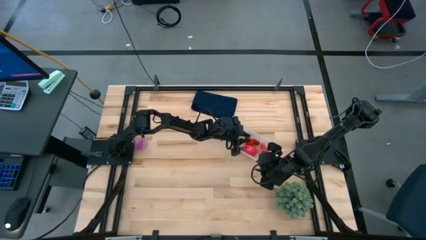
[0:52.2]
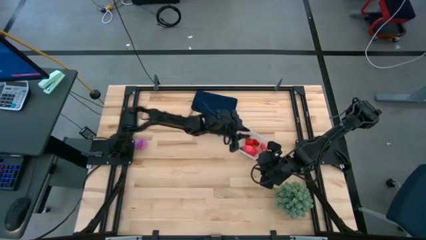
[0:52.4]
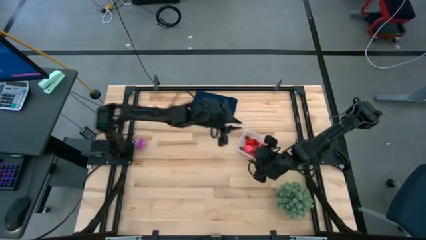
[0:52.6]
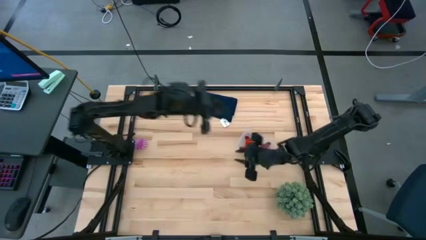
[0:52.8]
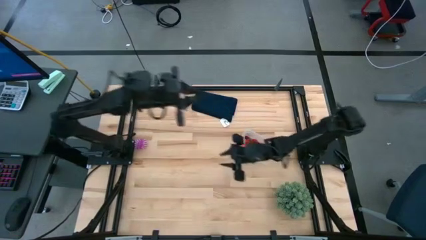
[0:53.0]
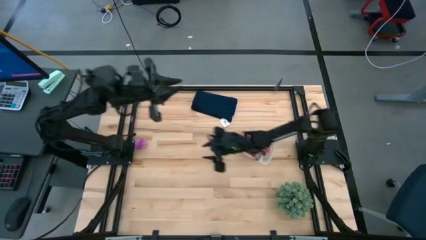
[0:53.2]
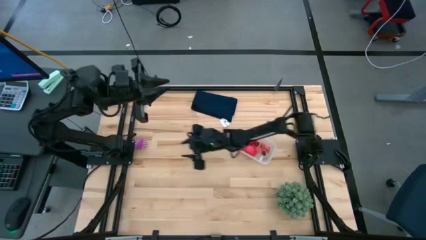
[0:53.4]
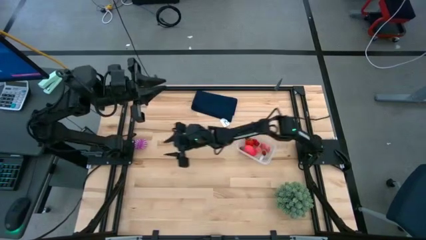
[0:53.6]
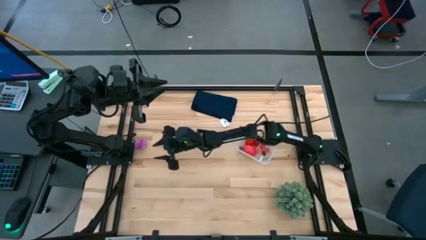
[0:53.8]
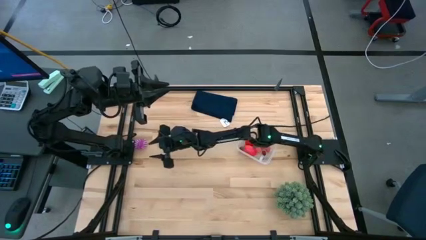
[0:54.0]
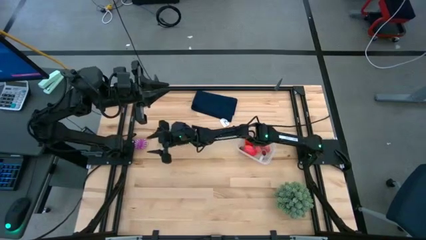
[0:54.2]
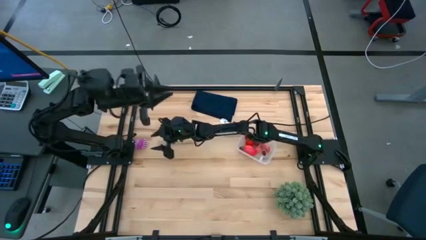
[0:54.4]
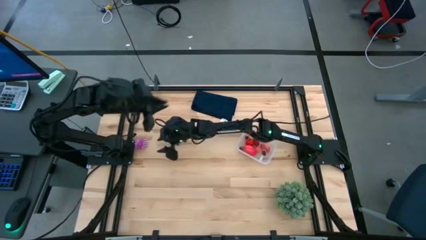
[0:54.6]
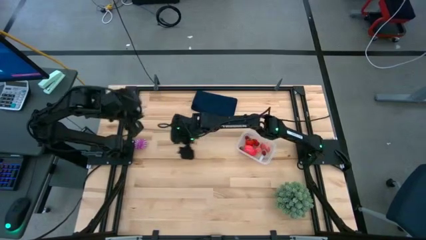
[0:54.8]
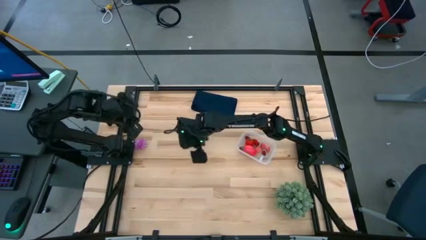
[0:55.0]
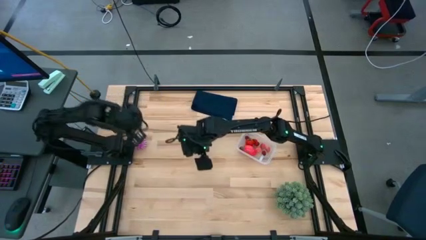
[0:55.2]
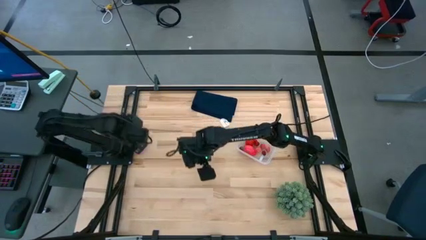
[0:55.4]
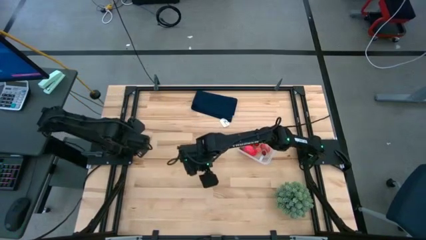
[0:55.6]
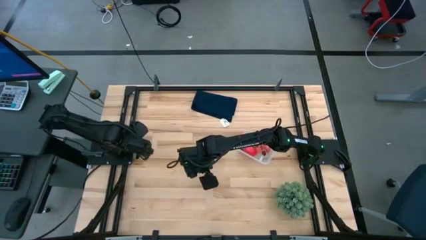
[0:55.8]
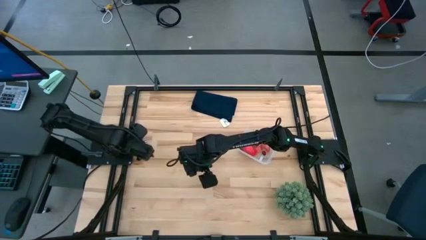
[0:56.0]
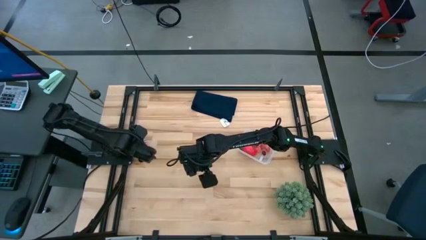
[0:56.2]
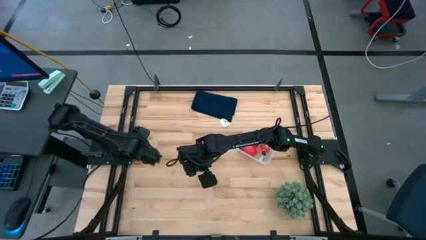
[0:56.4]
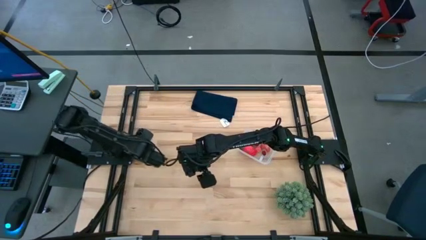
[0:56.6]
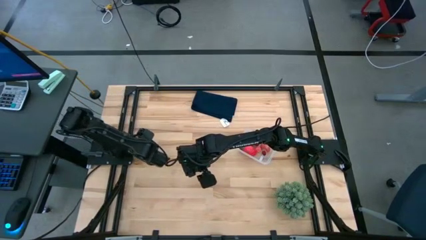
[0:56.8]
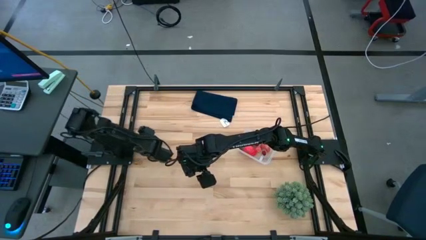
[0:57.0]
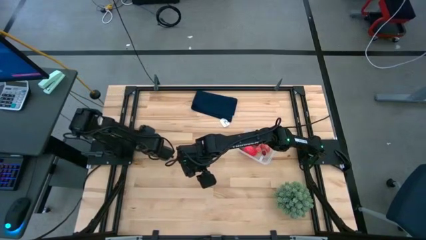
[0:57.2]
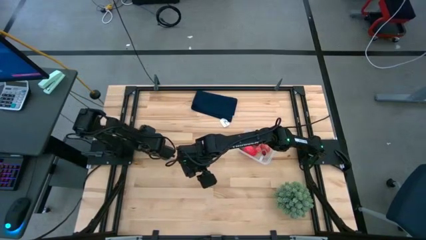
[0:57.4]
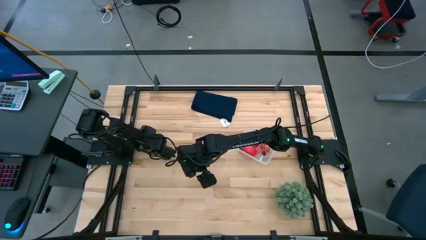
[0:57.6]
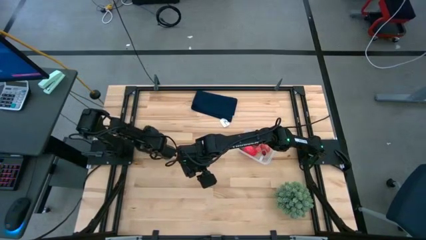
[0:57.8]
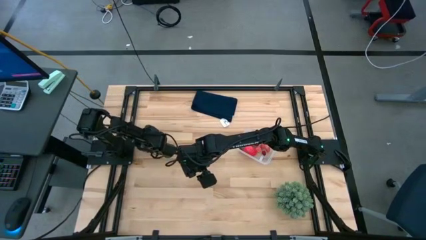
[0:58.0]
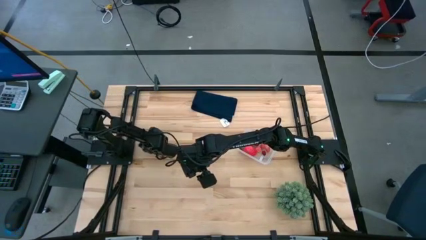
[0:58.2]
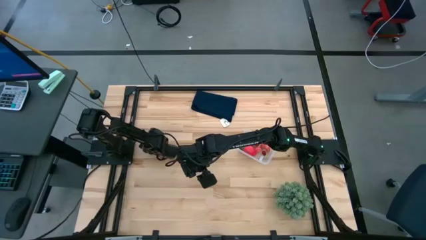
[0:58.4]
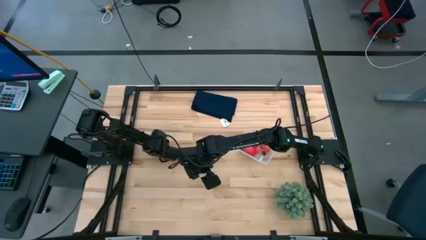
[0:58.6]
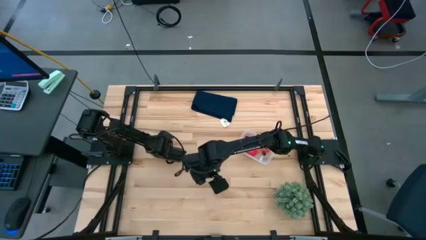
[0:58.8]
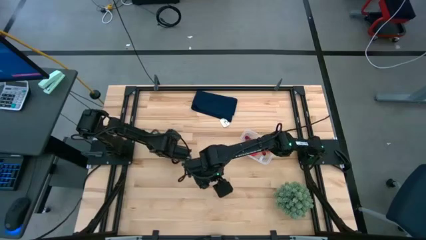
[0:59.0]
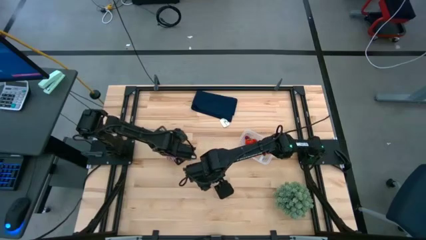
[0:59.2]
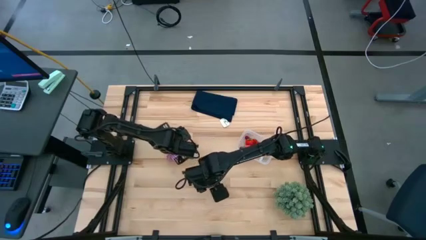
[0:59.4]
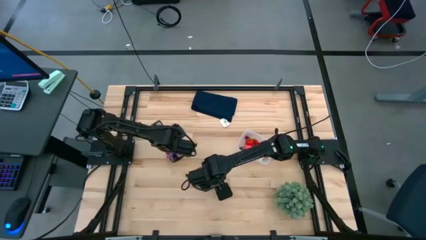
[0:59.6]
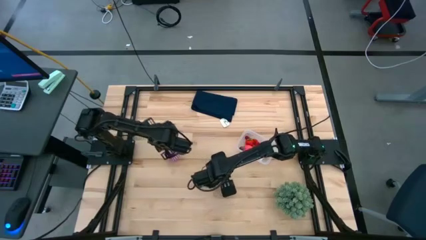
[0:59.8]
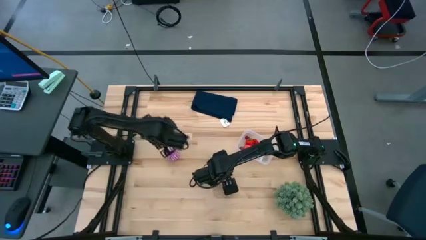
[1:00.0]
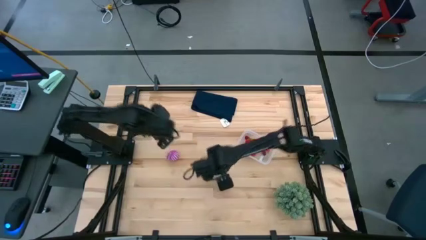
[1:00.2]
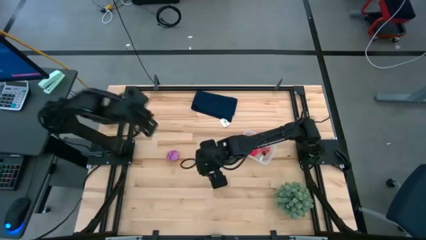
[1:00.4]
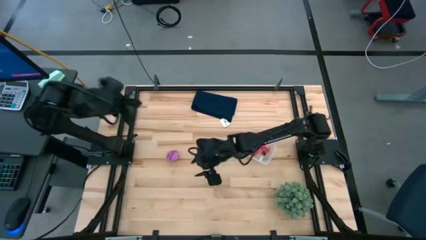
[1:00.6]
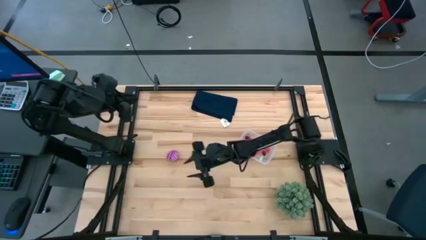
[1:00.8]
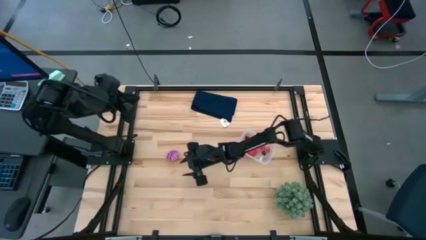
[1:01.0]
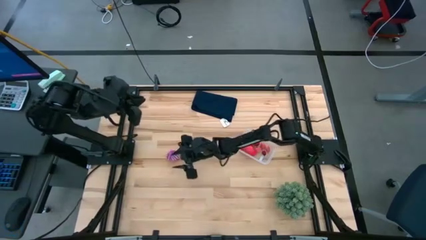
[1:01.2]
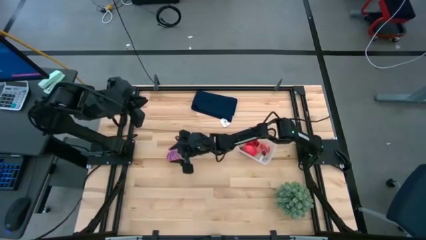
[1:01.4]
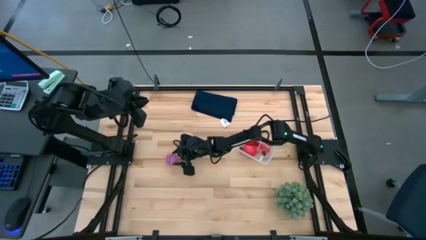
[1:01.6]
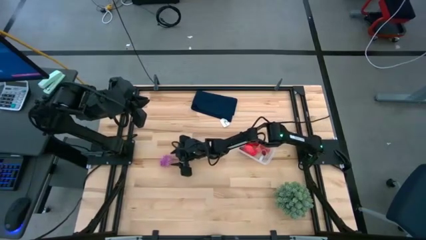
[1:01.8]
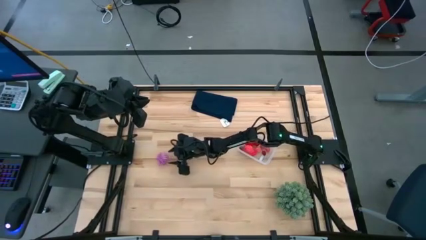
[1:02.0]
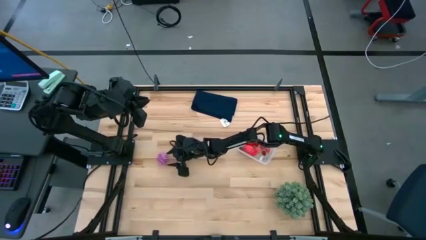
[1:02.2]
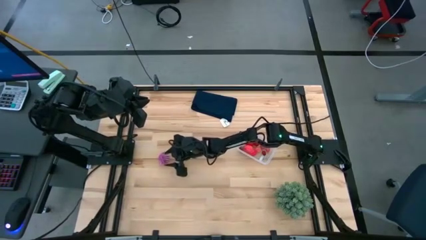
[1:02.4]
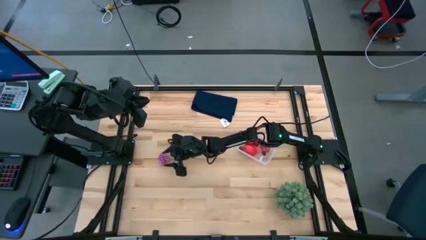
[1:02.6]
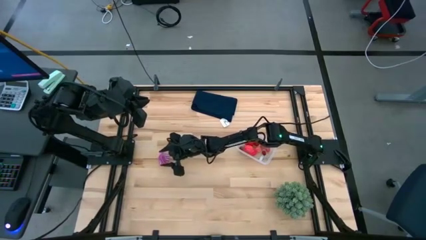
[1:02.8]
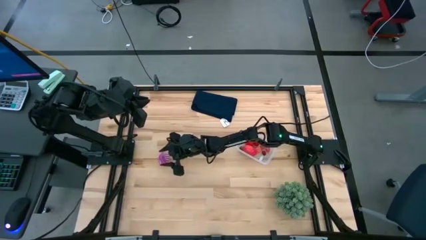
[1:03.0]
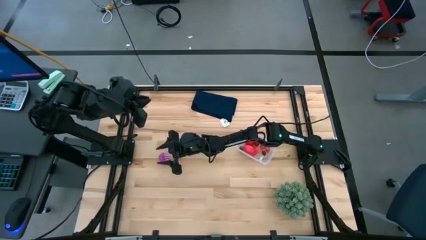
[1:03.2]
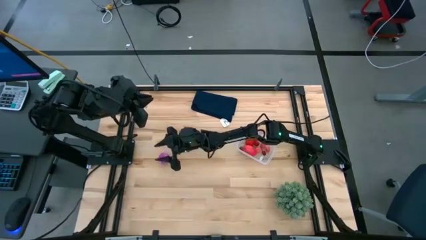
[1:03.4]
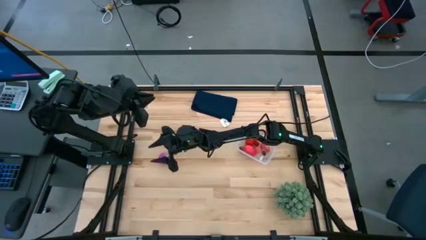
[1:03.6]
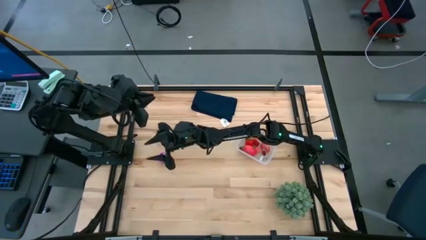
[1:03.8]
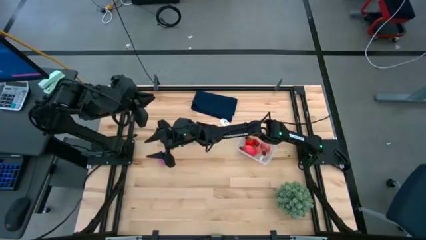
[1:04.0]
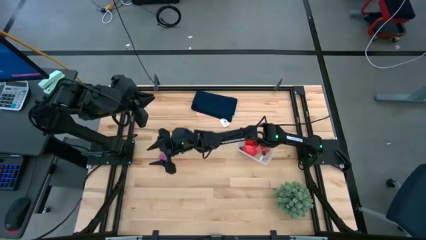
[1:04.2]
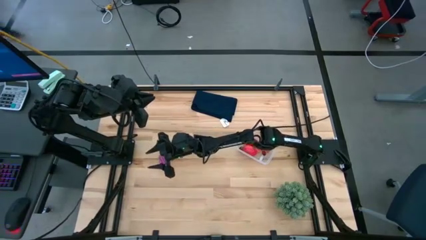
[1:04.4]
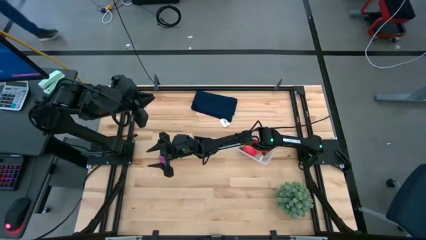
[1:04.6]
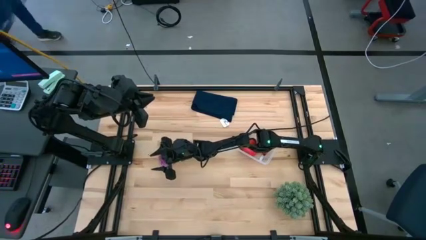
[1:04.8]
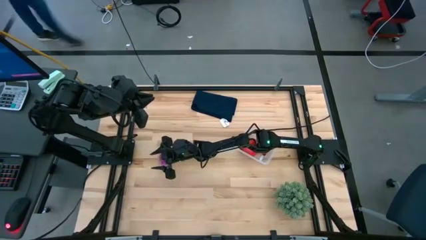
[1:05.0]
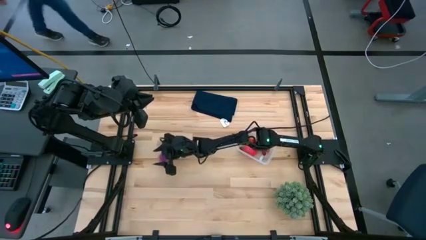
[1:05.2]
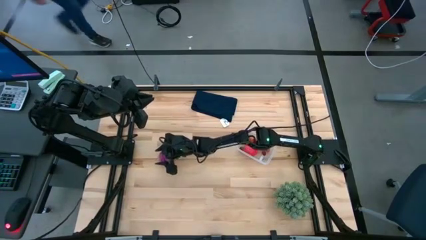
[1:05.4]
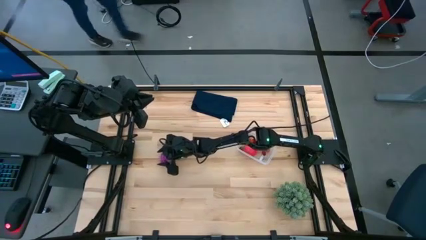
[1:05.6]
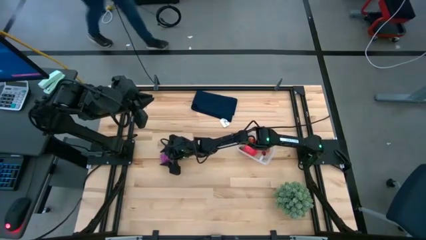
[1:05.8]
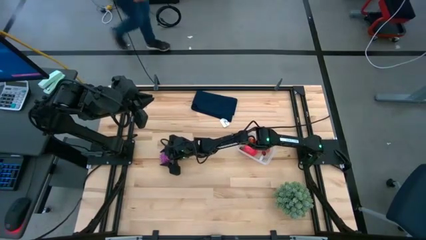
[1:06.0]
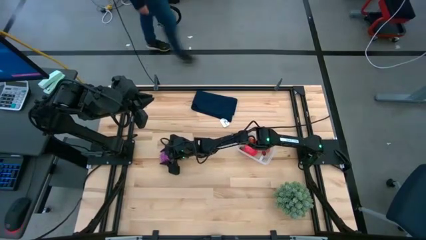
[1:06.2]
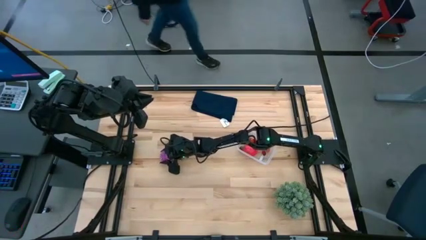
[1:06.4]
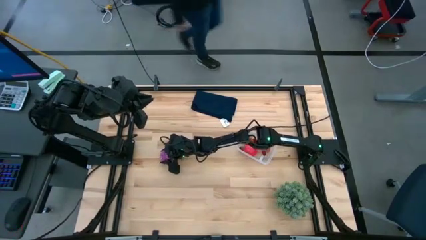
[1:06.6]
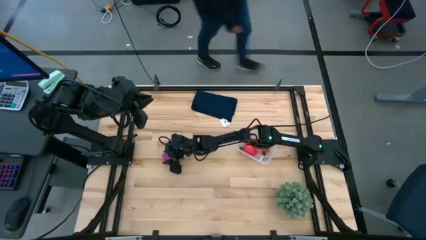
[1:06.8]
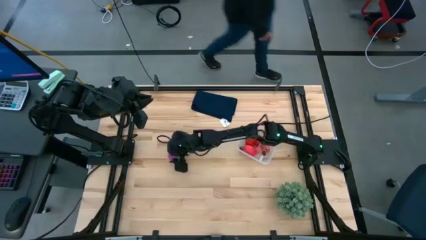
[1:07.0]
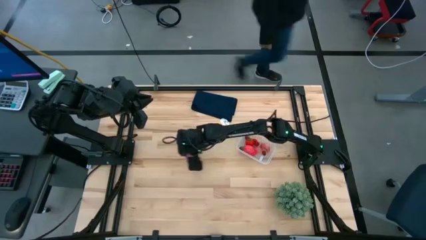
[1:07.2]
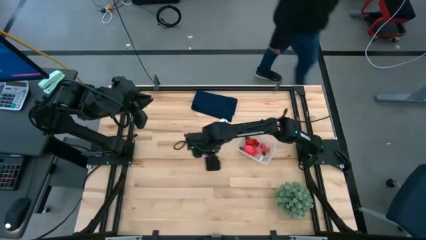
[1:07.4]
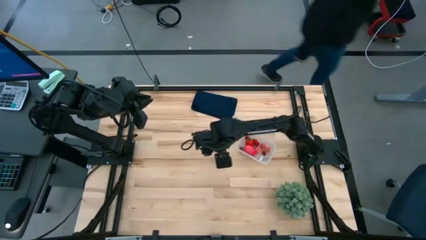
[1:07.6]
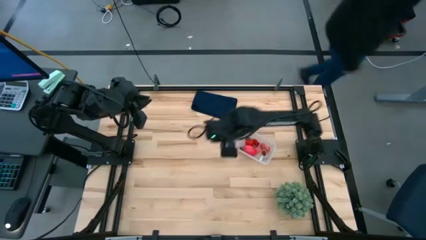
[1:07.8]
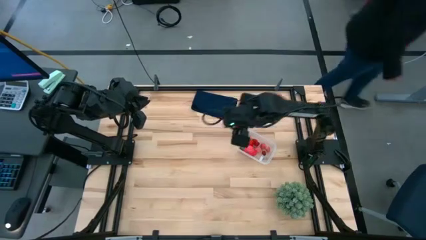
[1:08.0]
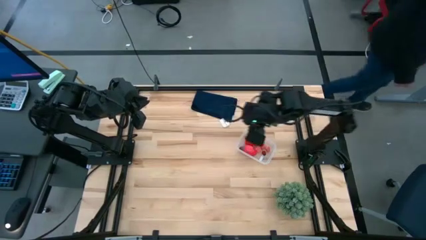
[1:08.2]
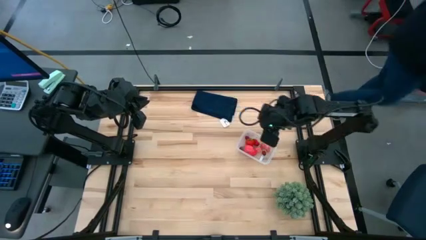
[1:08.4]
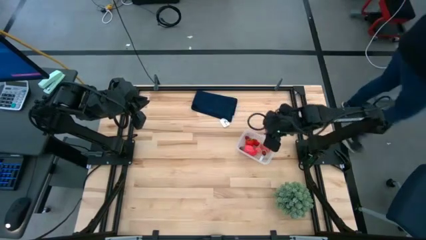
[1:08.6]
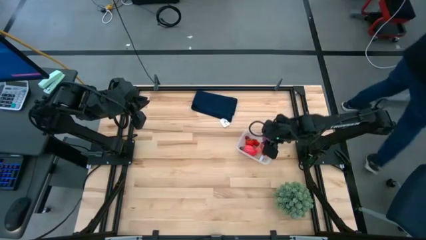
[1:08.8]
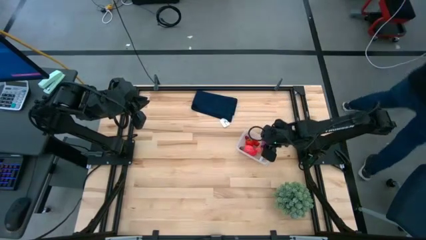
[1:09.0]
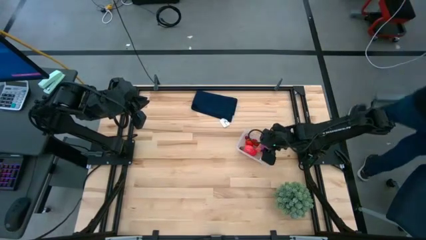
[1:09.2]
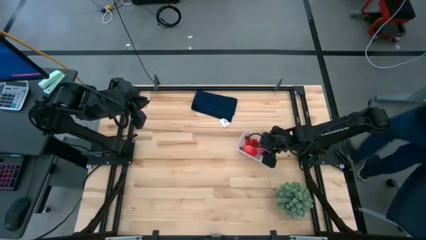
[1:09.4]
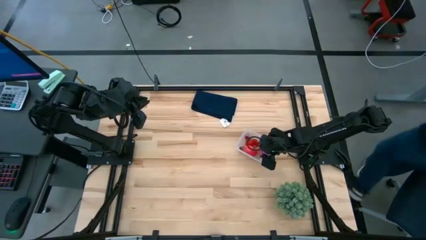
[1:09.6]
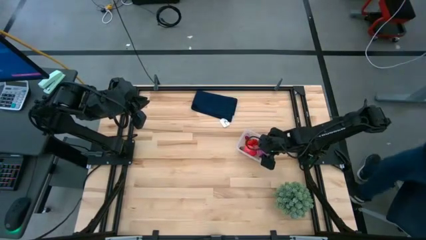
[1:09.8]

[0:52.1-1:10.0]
Task: Pick and placing Produce into tupperware
Put the onion into the transparent bin
